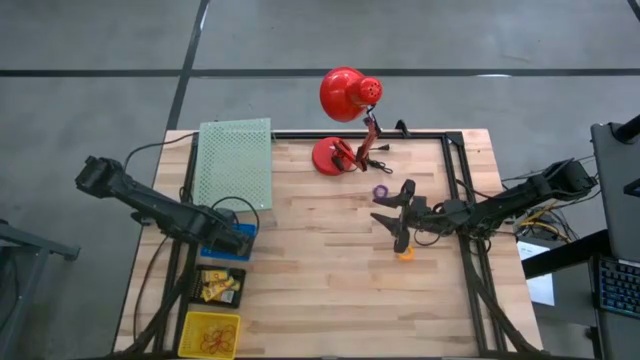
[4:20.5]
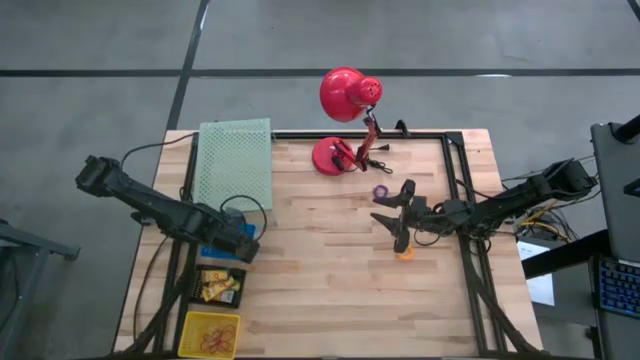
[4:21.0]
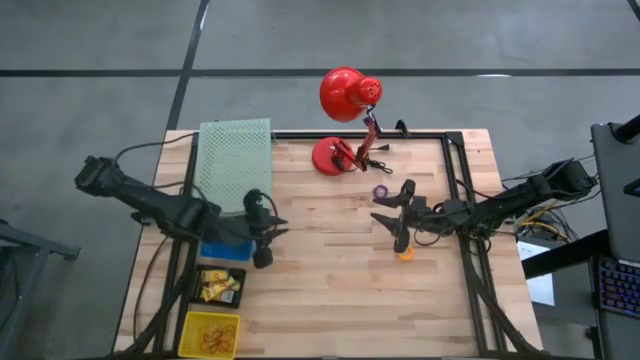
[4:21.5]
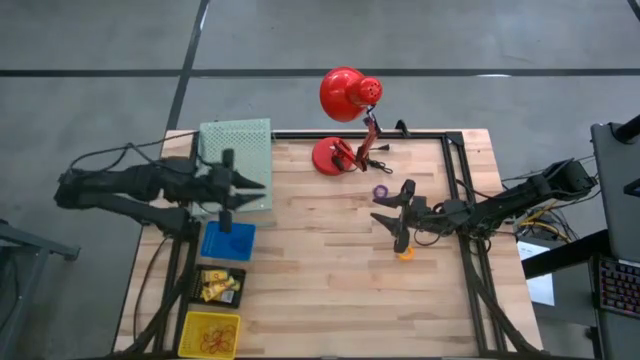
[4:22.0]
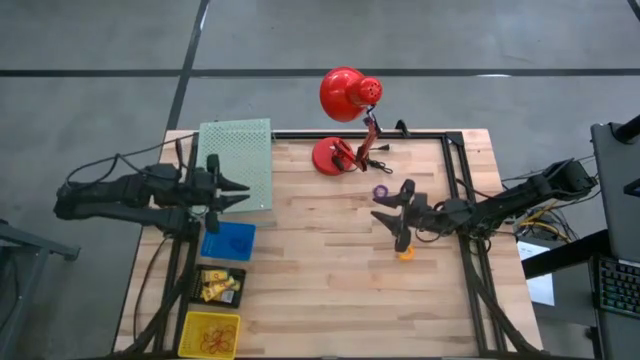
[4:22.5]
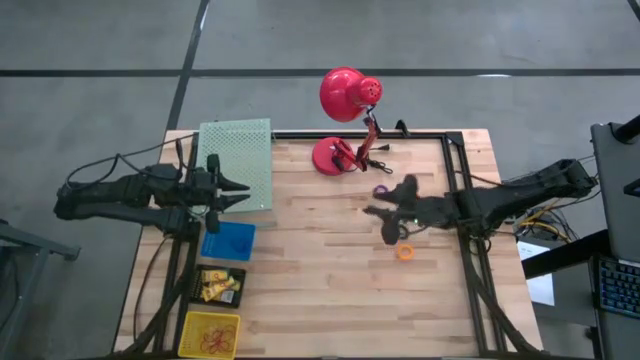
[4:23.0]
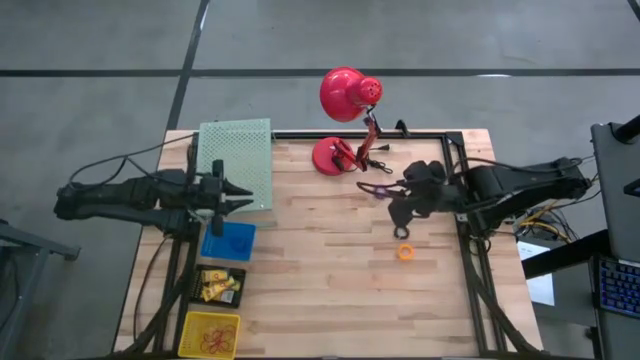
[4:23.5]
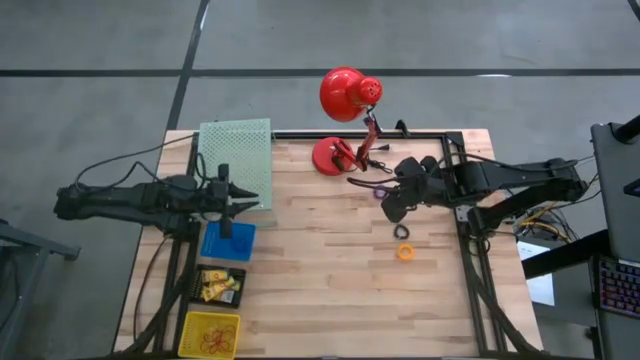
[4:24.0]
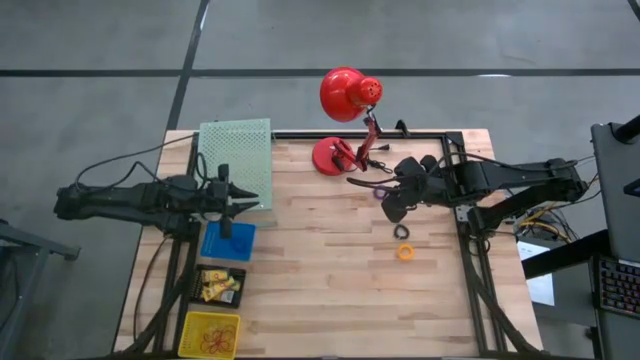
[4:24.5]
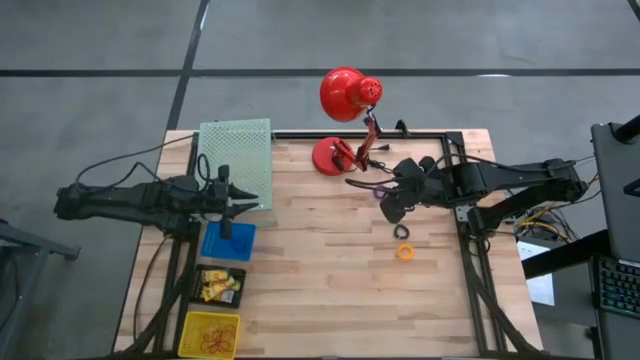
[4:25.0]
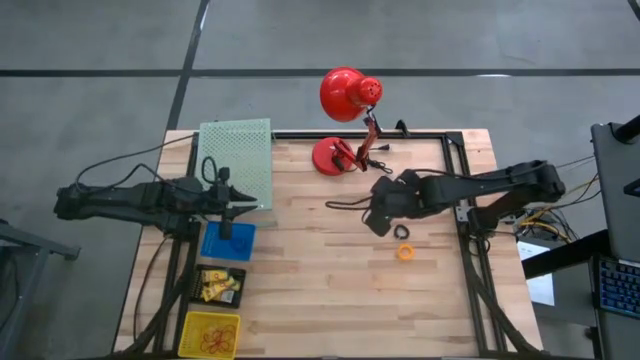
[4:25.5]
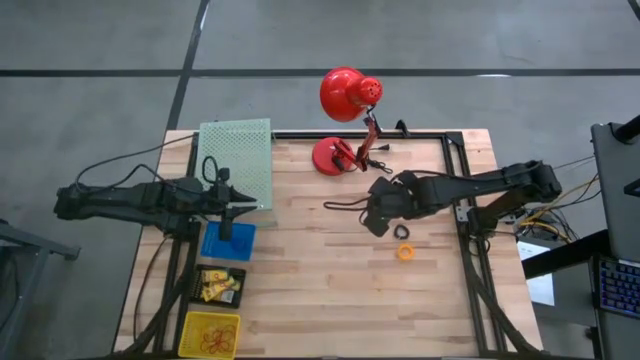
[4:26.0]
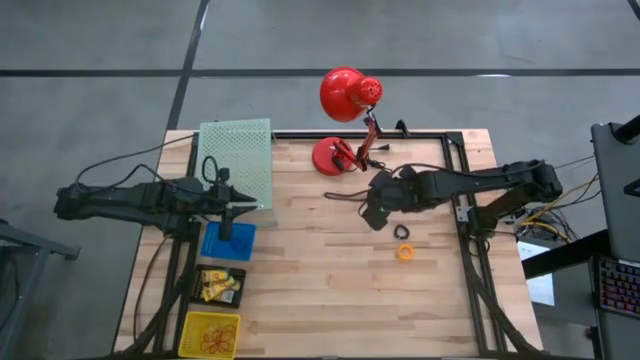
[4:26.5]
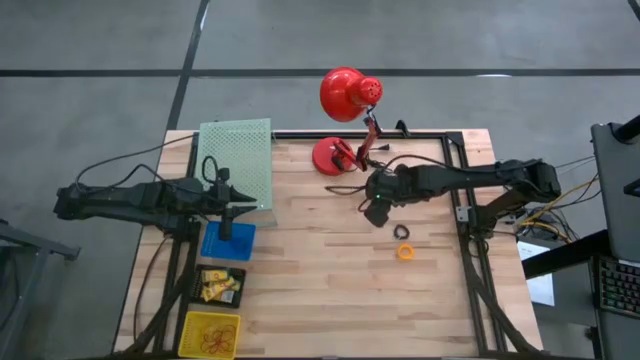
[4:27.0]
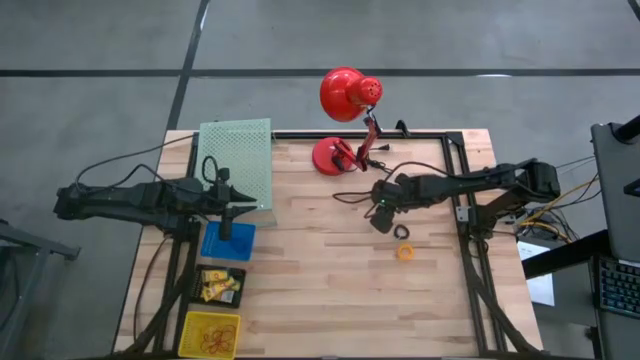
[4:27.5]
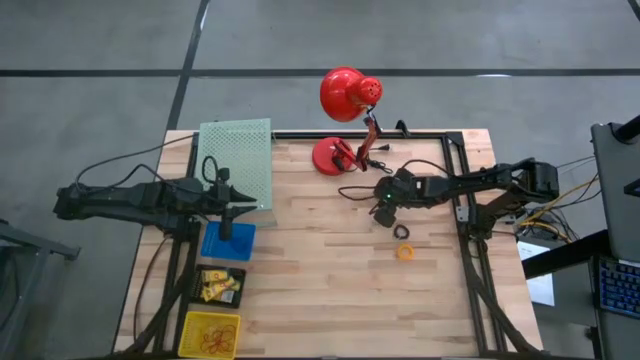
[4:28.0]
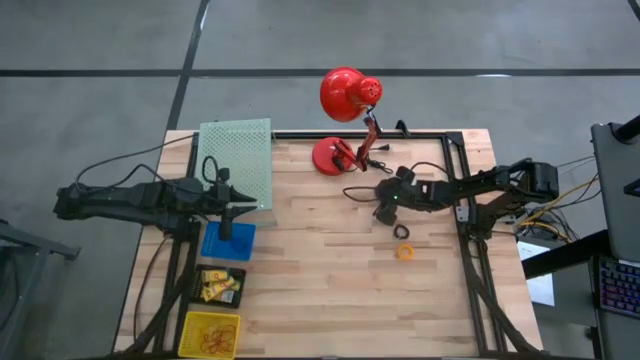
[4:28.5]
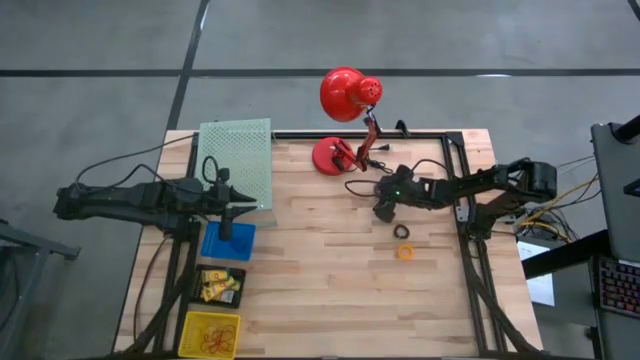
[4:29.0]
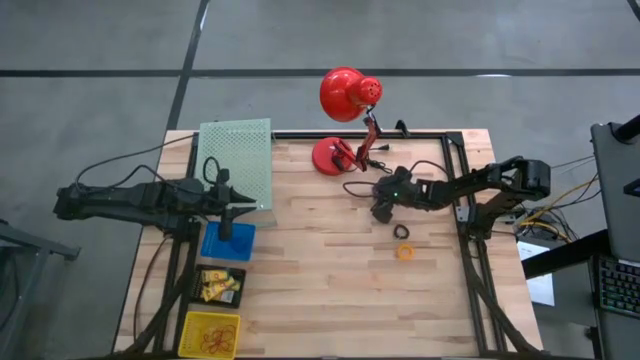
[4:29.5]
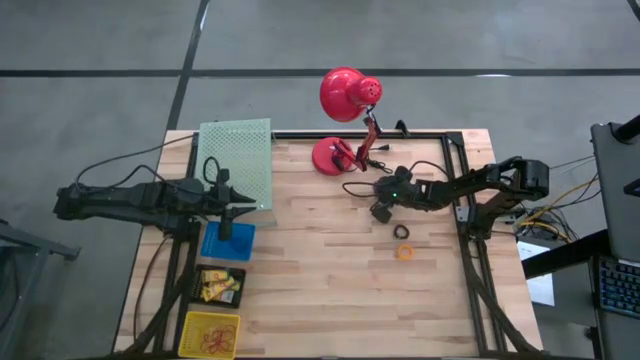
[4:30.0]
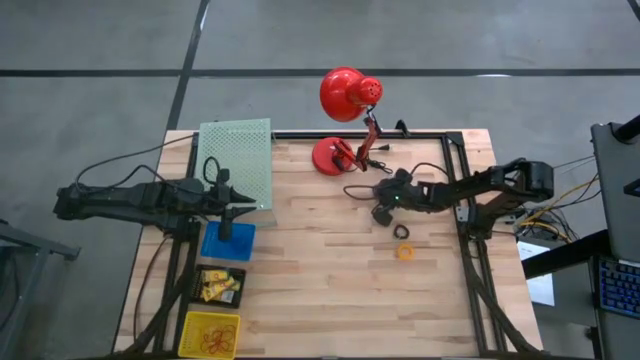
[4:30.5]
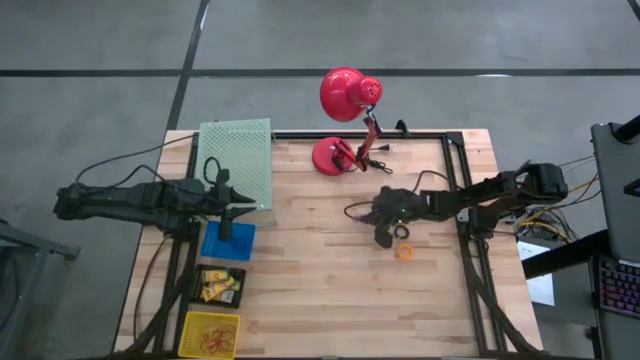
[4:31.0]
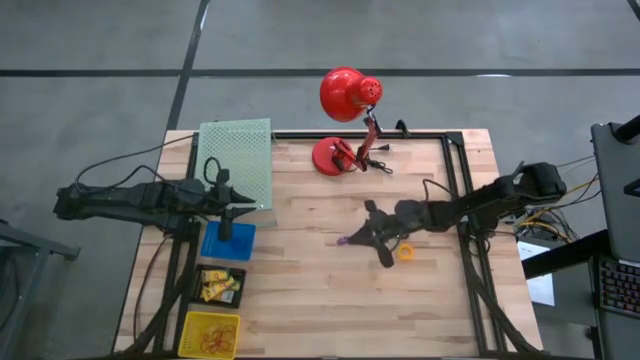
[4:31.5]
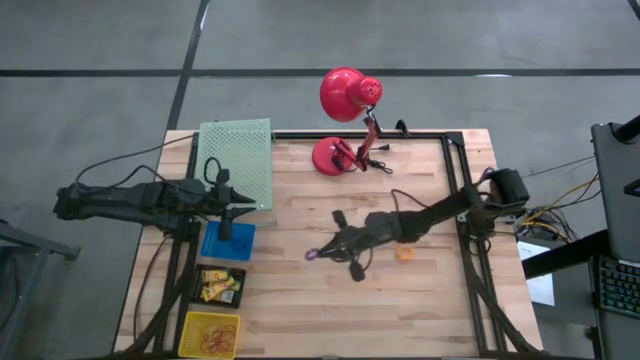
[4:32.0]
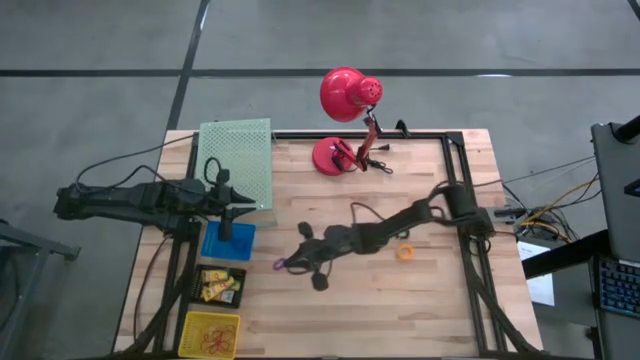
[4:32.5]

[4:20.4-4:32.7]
Task: Pick & Place Office Desk Supplies
Put the purple spring rubber band into the blue bin

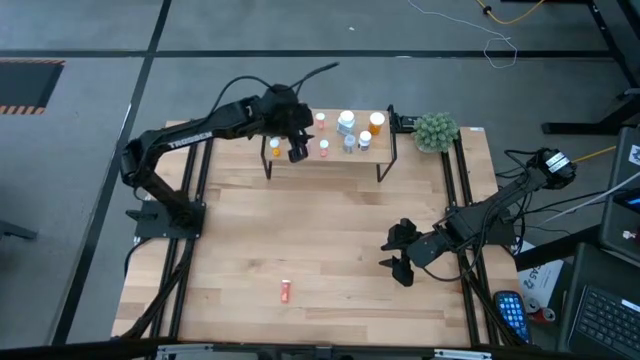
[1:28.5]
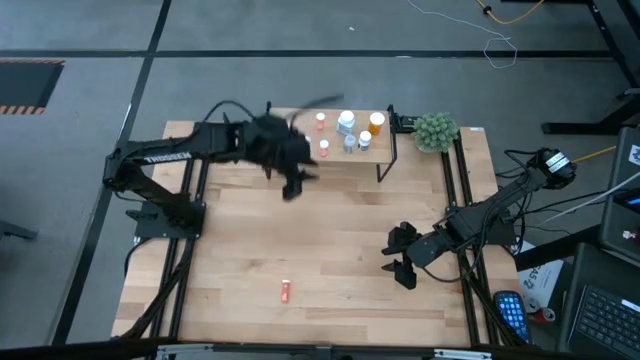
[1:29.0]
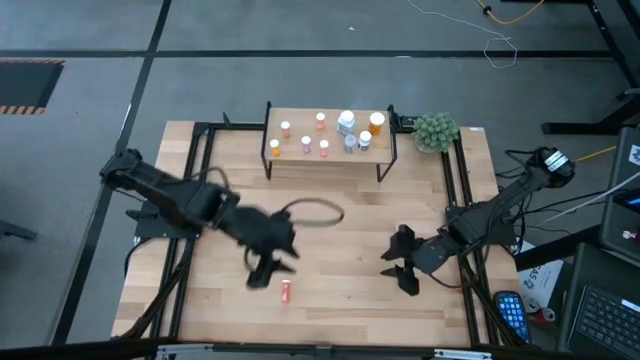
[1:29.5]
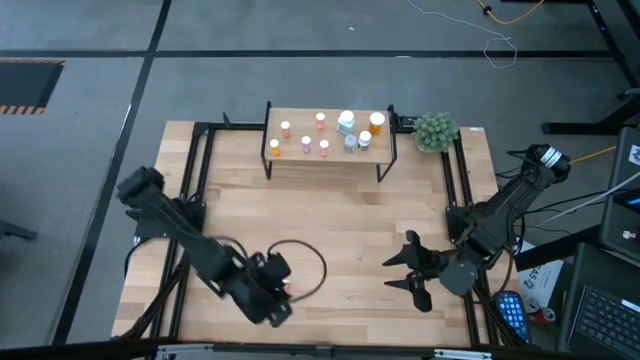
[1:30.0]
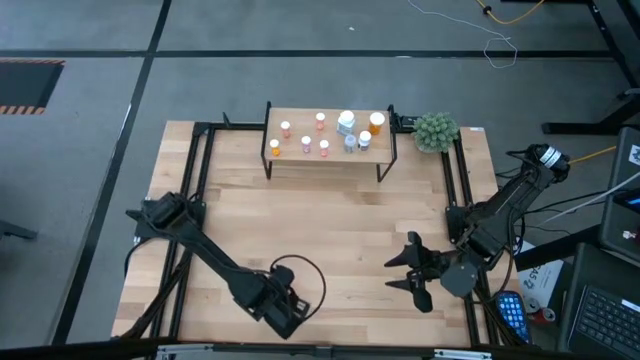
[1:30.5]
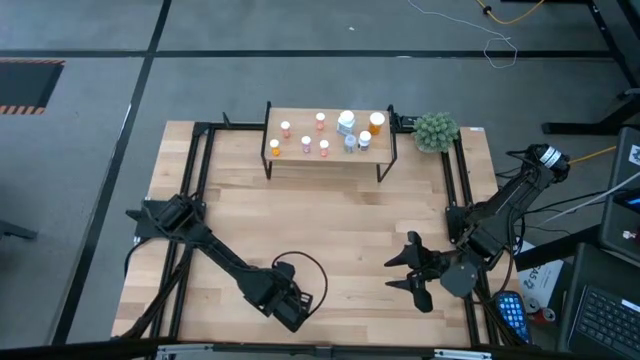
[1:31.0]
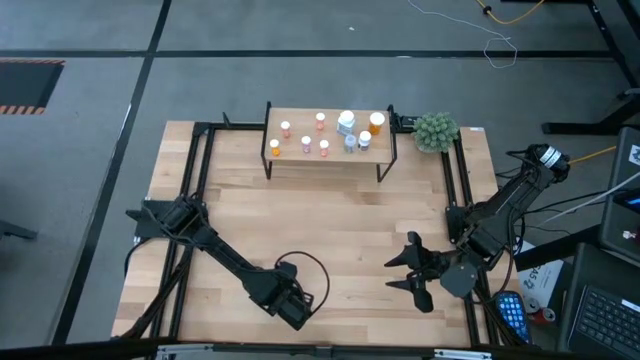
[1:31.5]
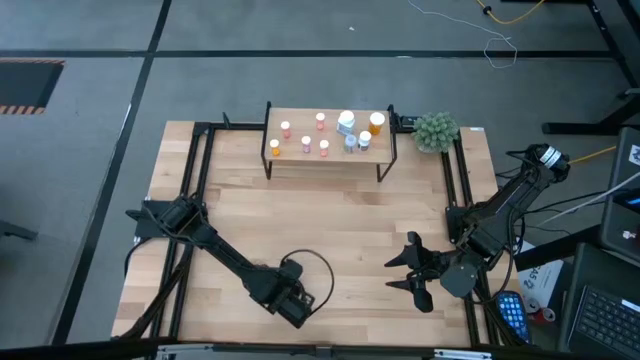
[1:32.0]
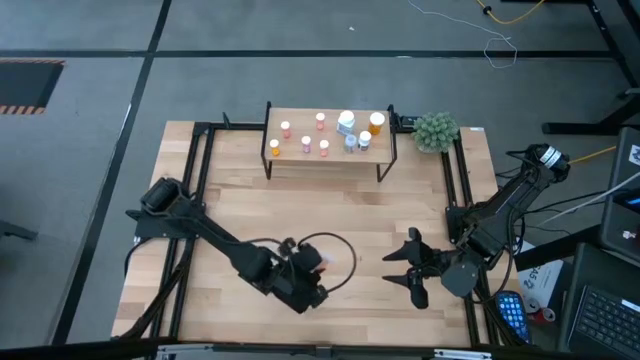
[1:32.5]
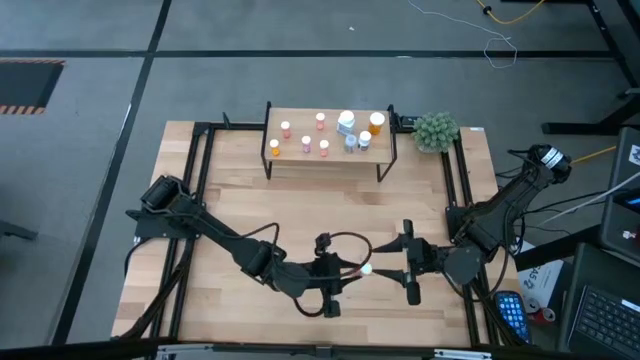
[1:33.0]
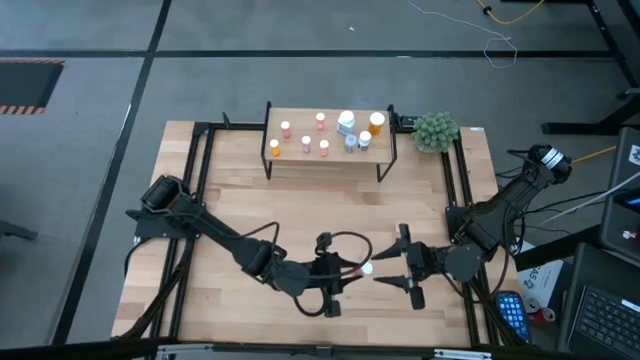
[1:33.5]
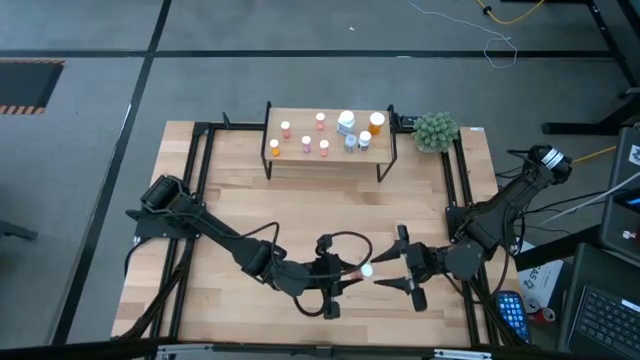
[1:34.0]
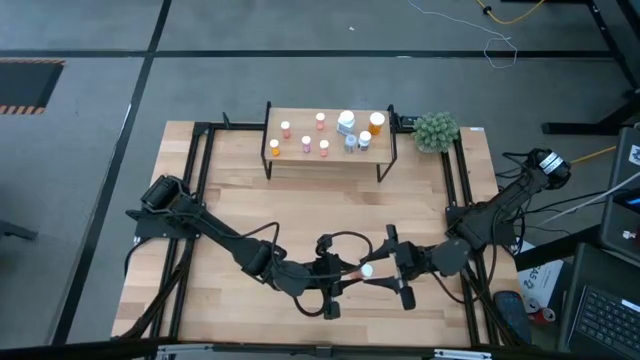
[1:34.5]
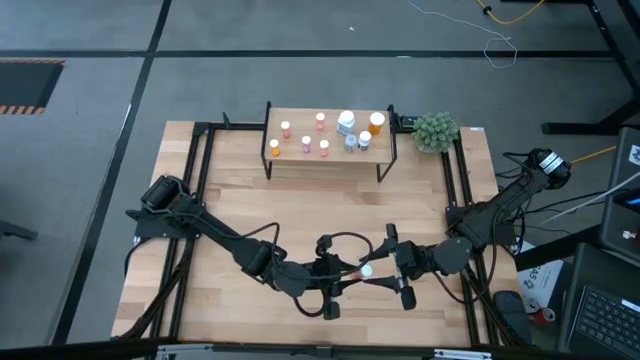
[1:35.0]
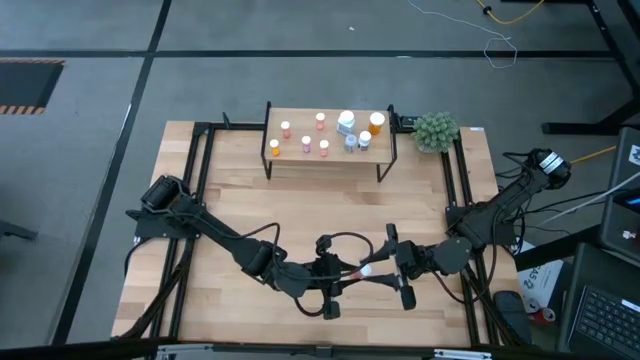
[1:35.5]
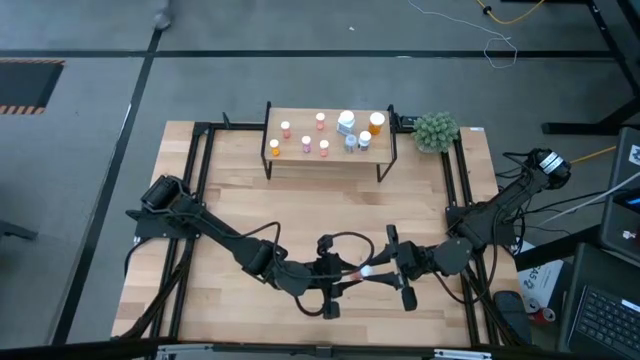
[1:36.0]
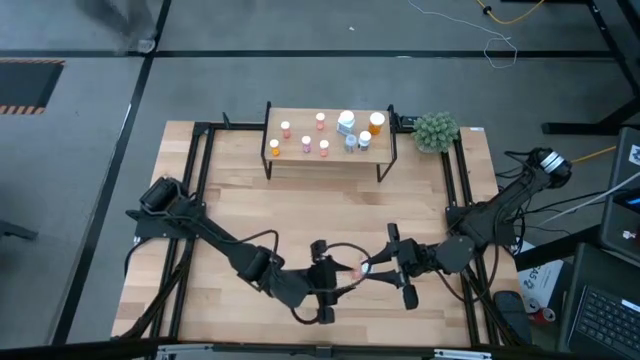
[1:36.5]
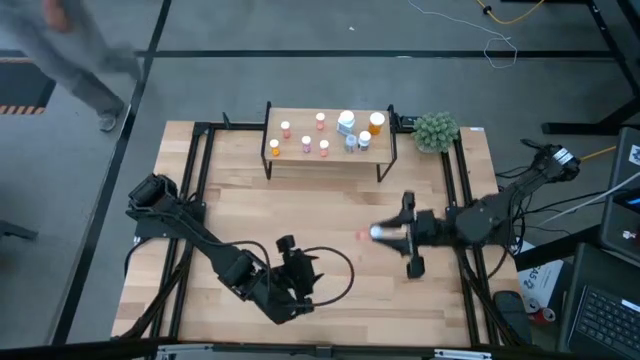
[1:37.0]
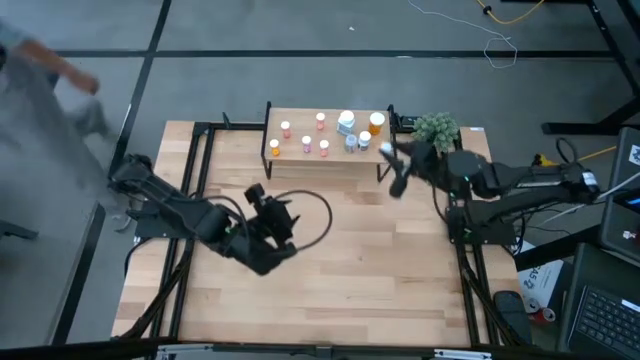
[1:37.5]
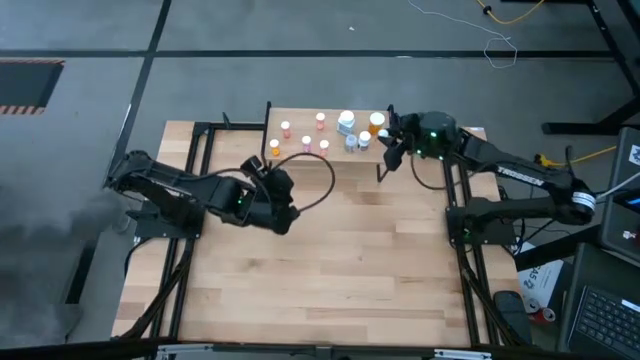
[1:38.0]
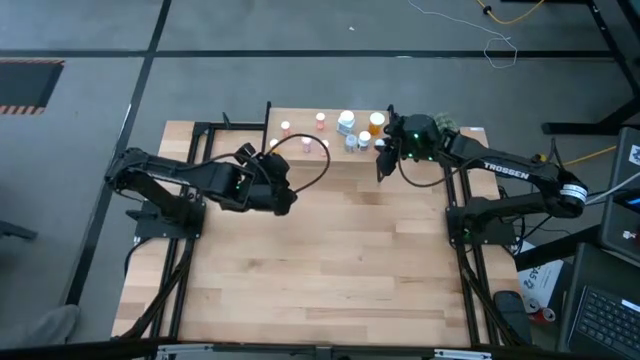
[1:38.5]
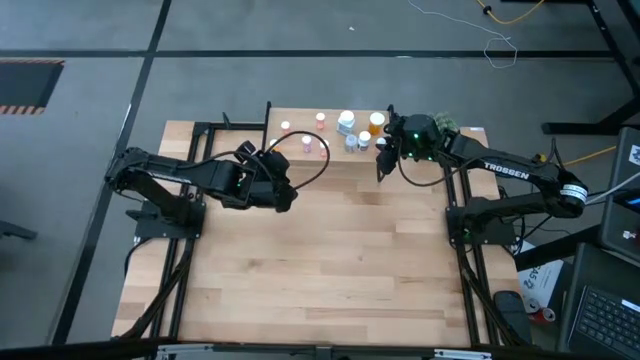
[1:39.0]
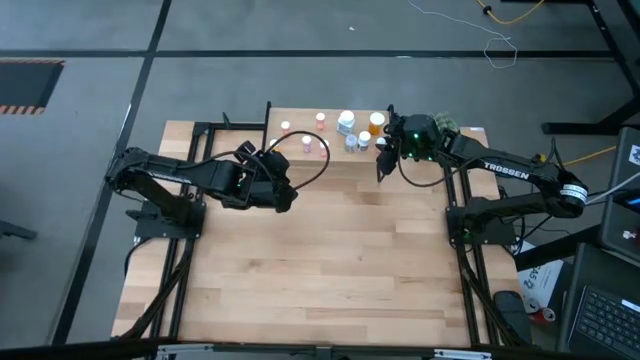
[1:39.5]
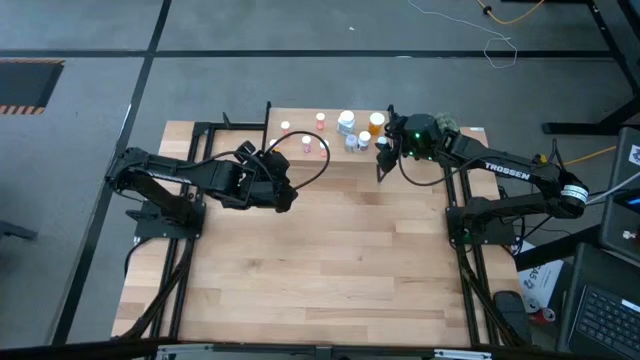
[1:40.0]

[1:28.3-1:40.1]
Task: Pick and place medicine bottles onto shelf by color
Put the small light orange pill bottle on the shelf
